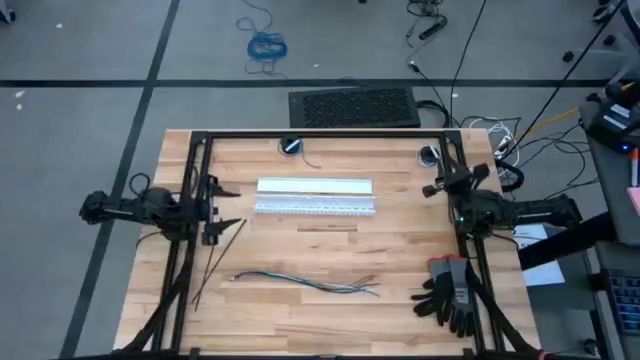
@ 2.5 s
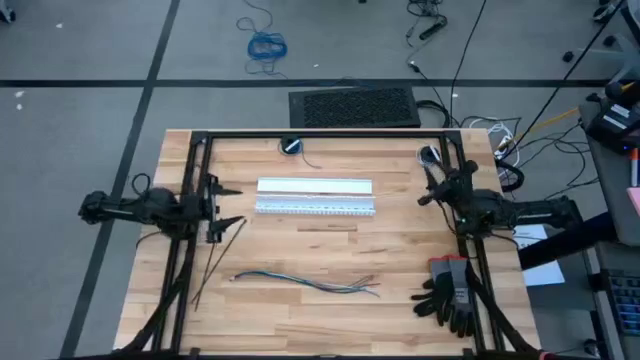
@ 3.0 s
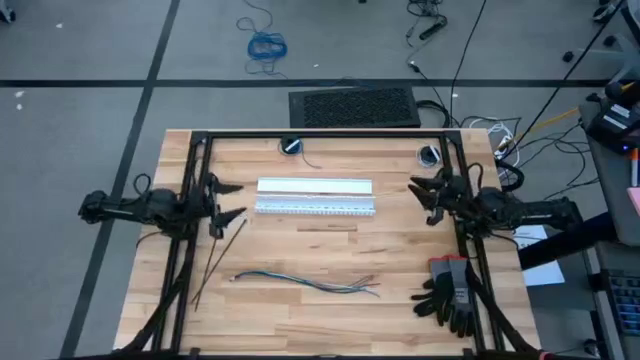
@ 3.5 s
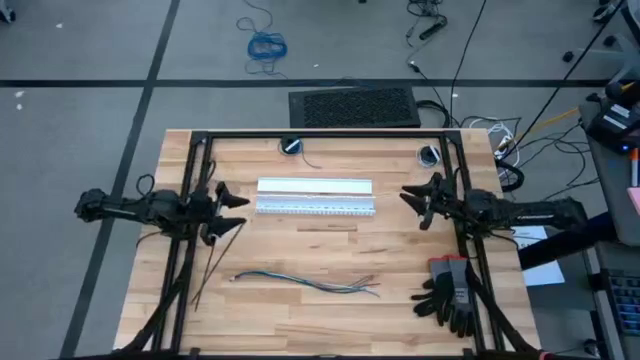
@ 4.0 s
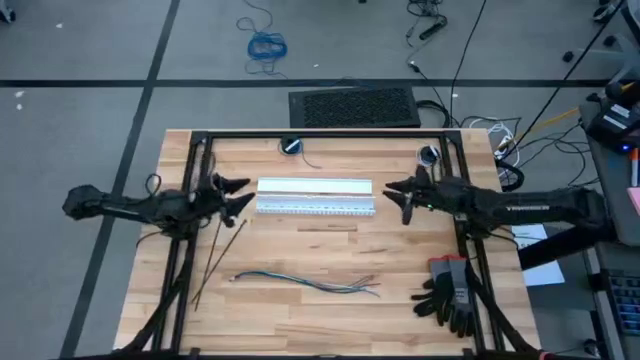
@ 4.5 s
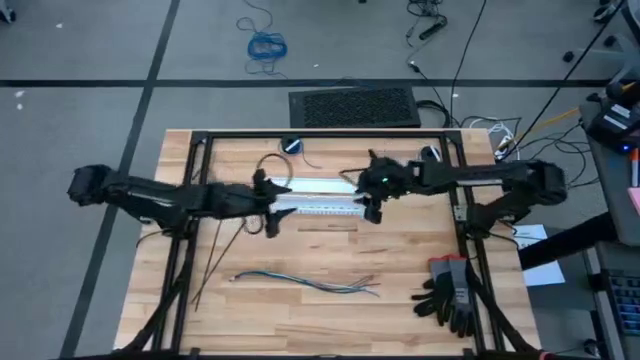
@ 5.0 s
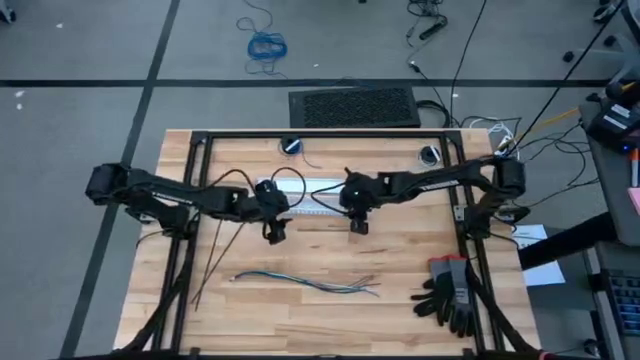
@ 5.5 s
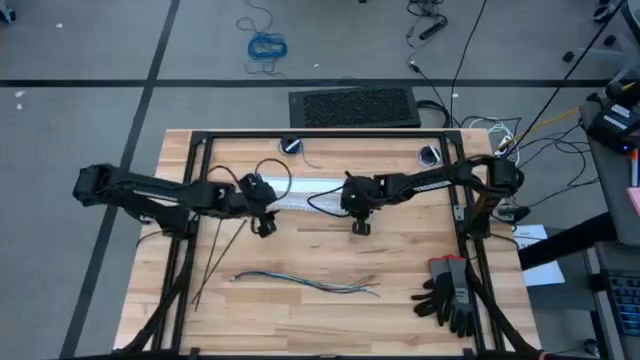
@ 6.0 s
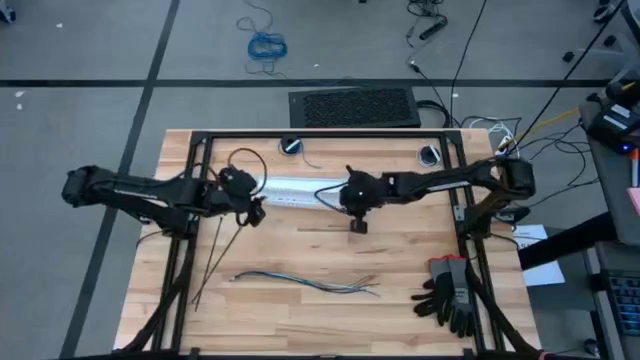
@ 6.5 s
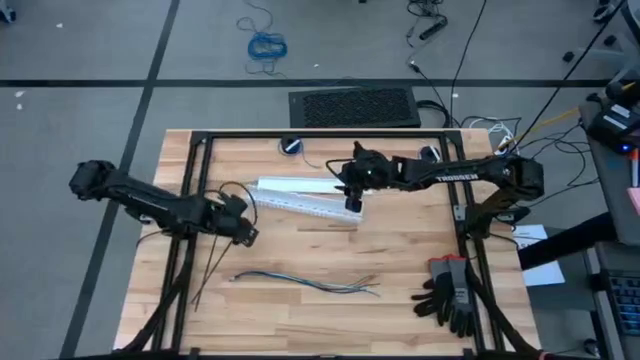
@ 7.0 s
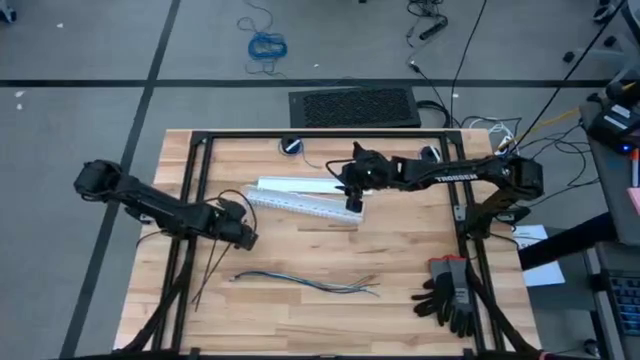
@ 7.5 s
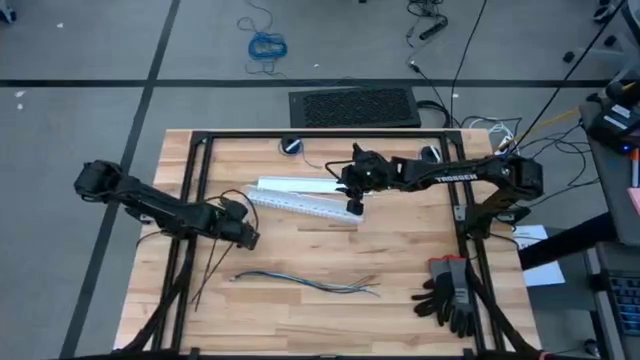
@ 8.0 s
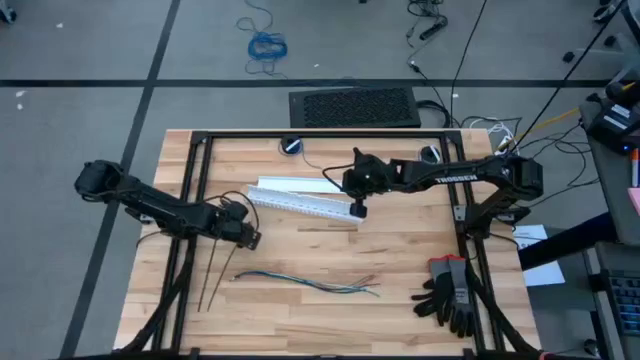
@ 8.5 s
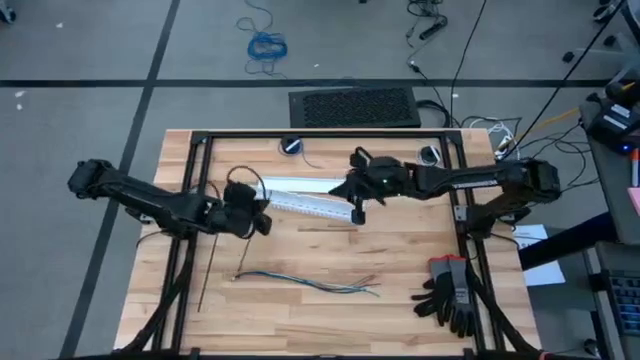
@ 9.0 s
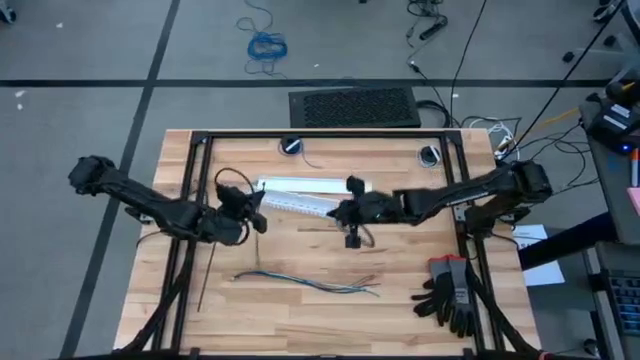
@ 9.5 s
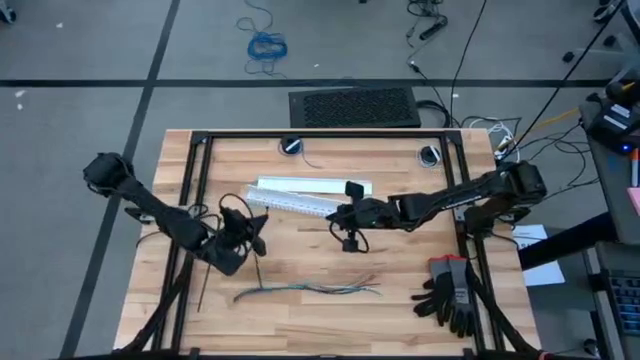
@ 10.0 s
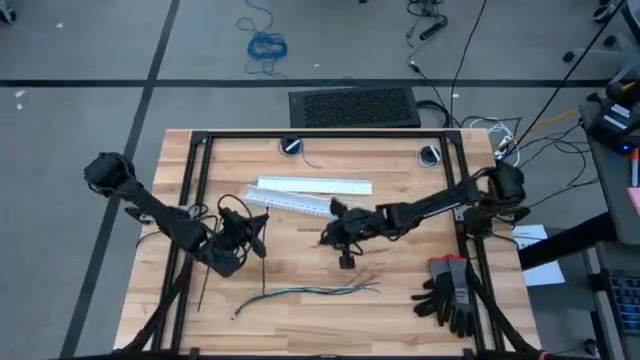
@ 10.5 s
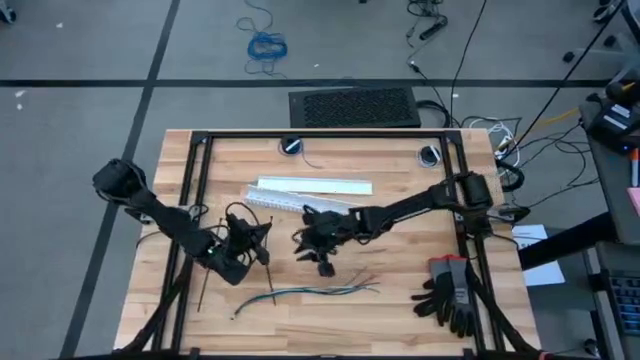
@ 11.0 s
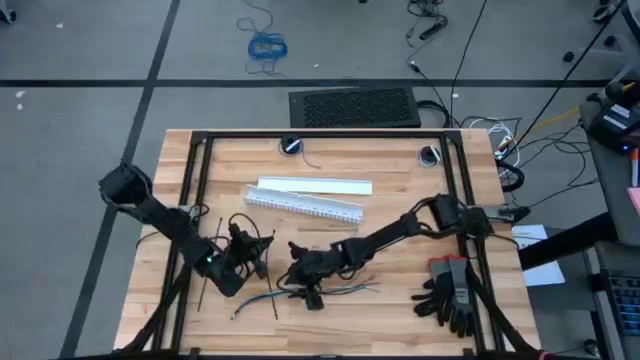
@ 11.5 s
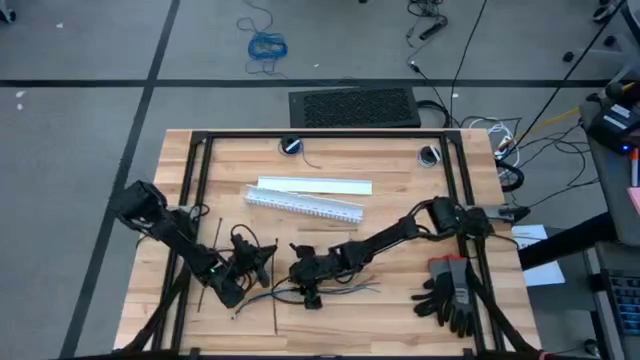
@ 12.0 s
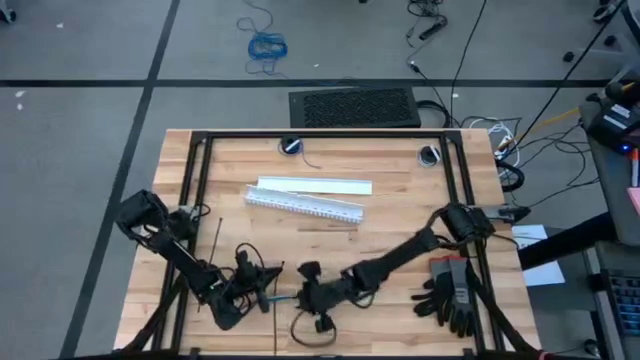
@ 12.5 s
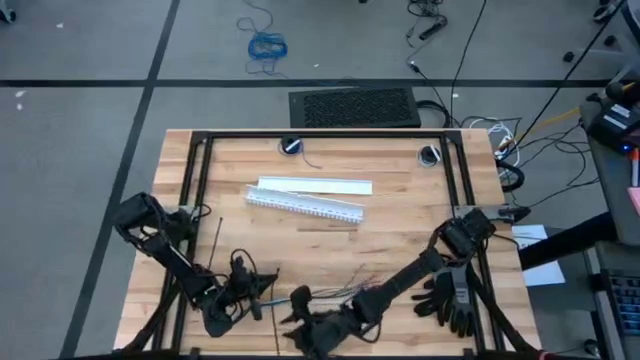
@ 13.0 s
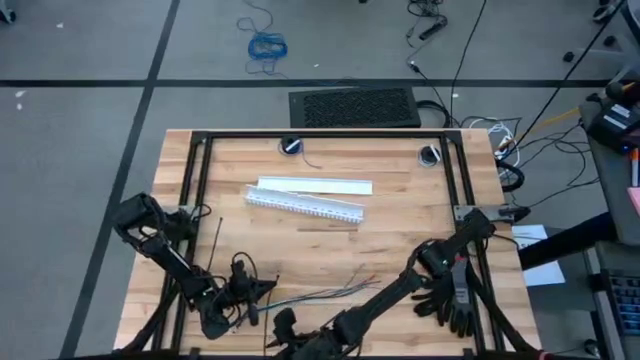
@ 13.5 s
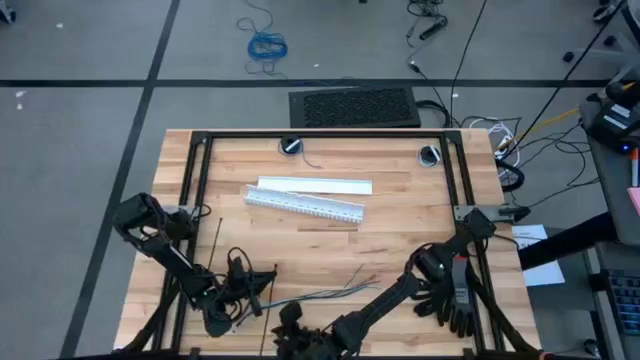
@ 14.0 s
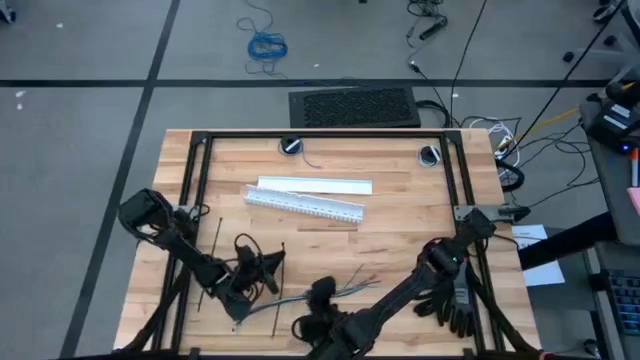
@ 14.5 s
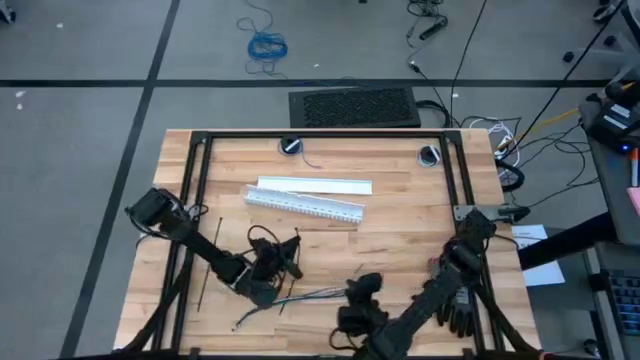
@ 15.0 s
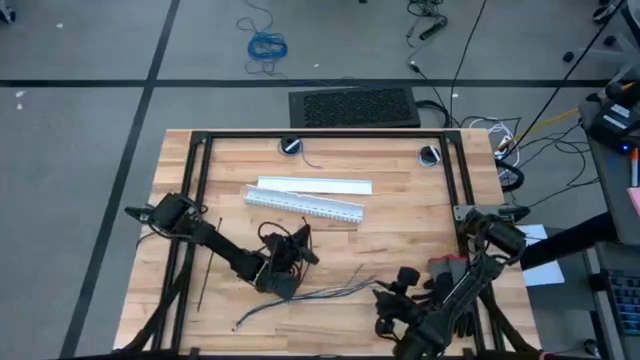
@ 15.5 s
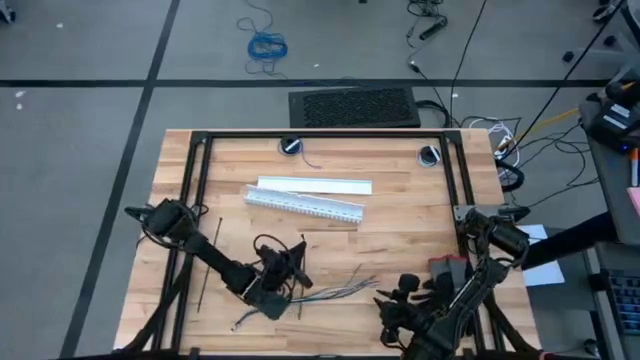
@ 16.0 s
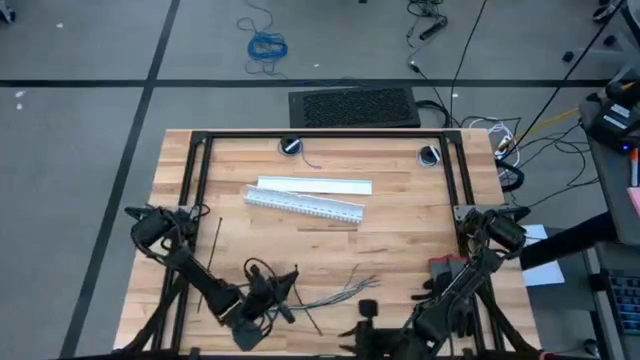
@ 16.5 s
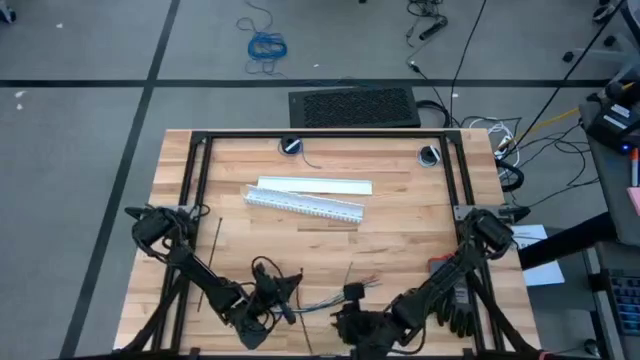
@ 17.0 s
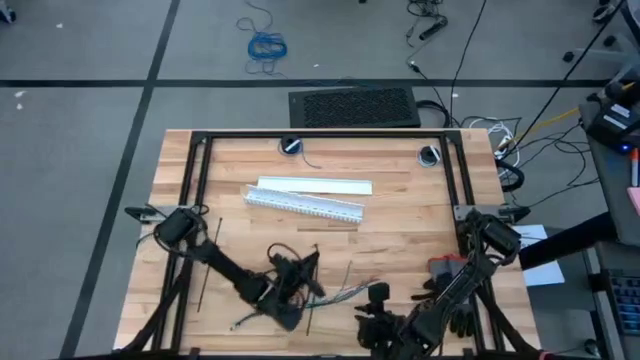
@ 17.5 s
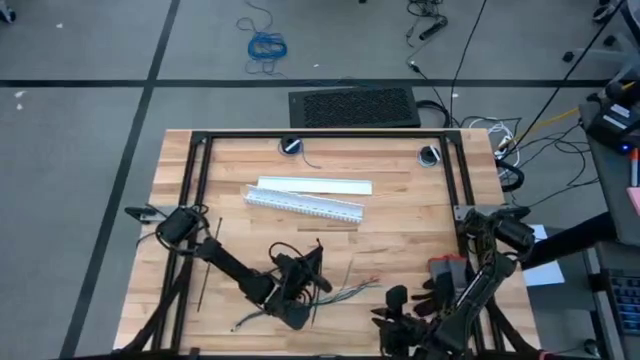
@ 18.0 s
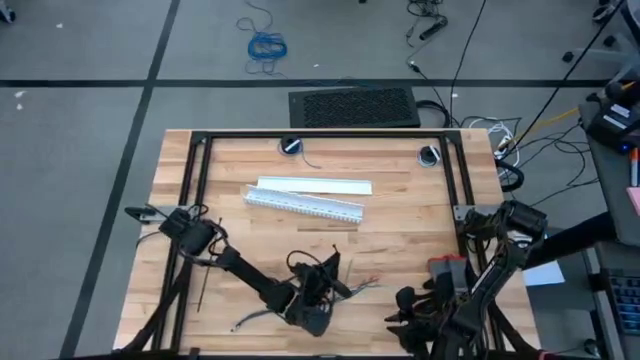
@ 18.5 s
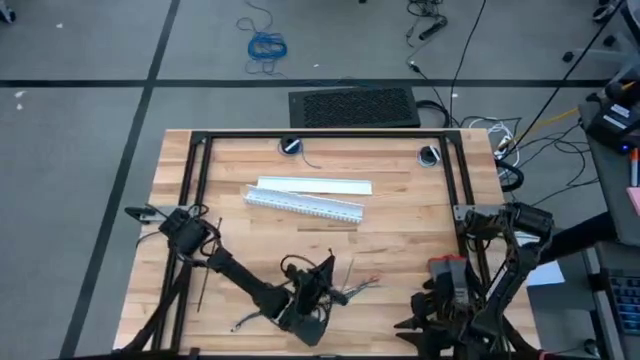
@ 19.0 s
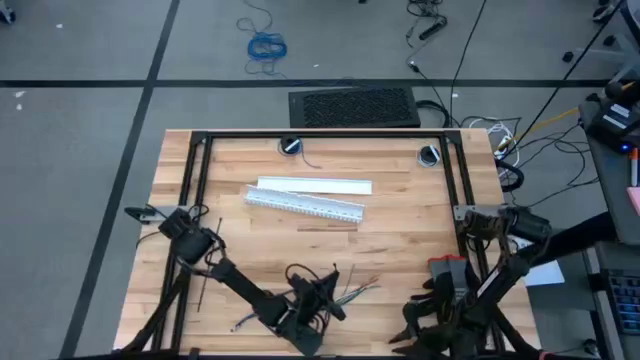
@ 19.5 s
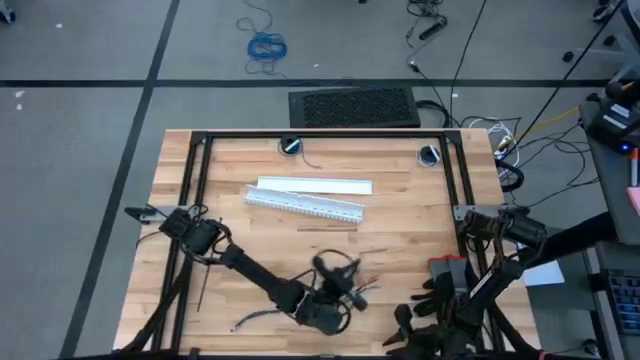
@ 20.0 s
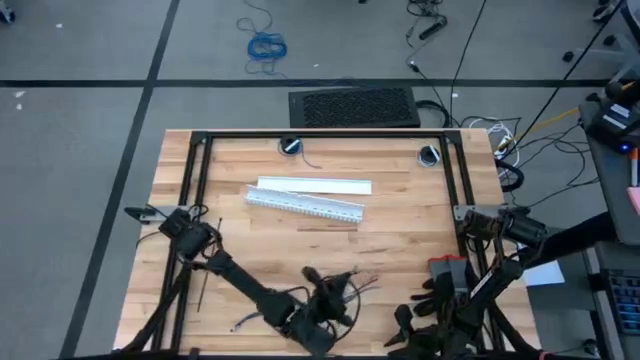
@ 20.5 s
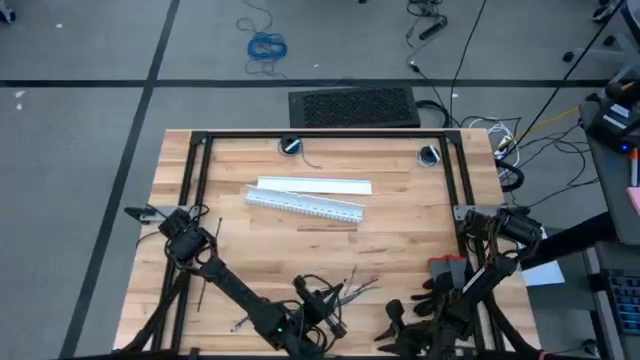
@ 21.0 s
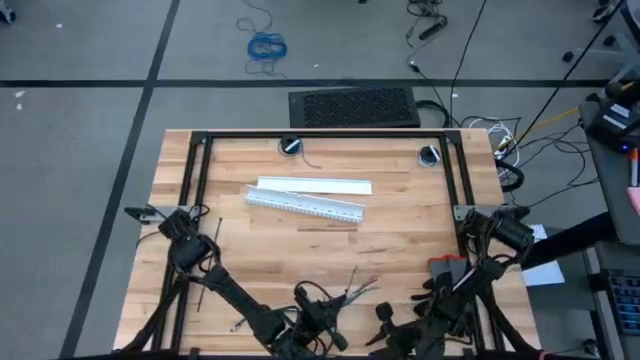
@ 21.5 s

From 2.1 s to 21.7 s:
Task: Ziptie cables
Wrap the cable wire using a zip tie
